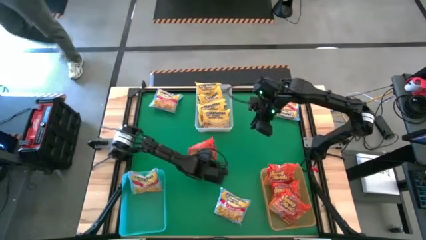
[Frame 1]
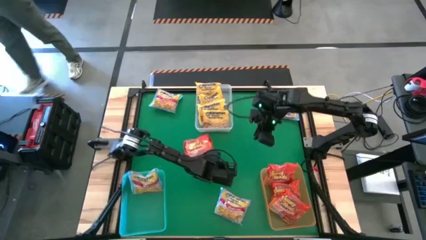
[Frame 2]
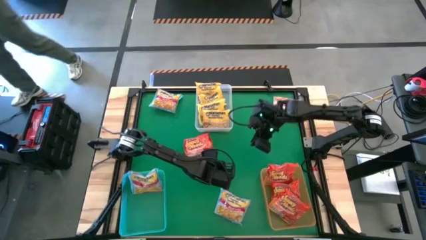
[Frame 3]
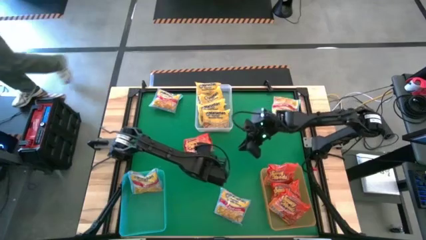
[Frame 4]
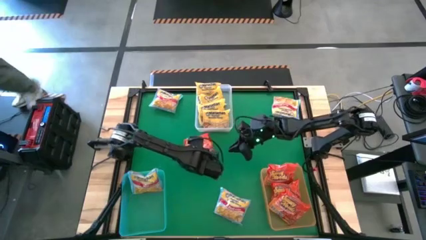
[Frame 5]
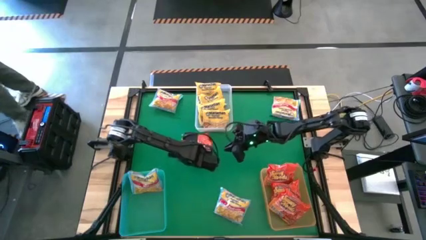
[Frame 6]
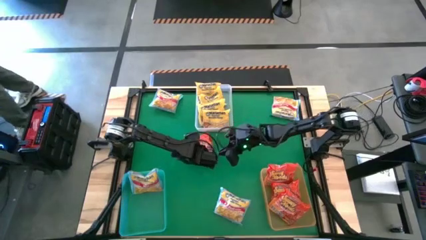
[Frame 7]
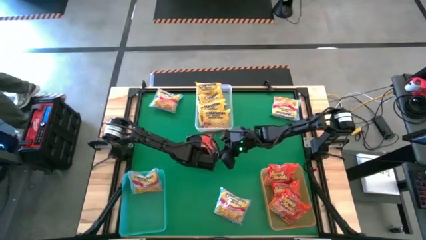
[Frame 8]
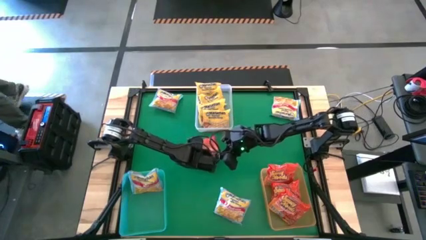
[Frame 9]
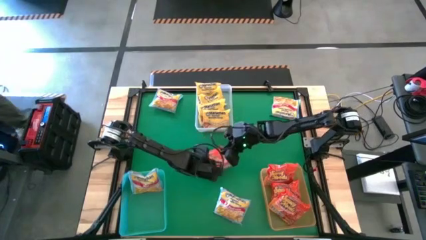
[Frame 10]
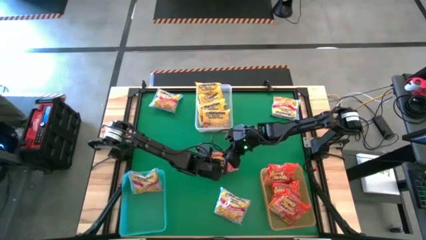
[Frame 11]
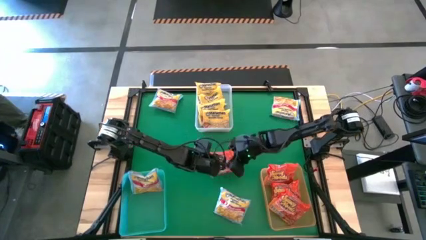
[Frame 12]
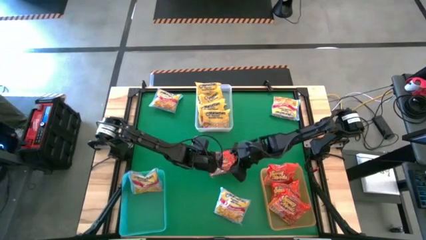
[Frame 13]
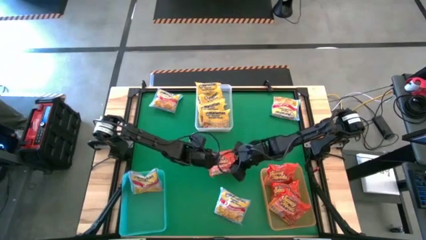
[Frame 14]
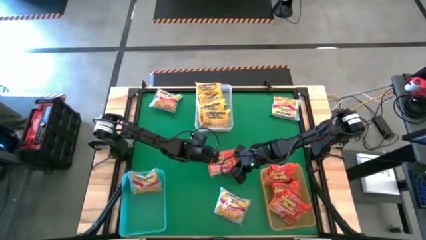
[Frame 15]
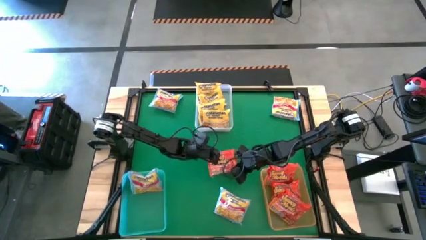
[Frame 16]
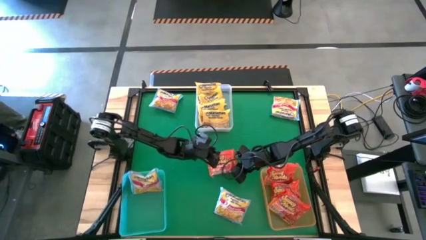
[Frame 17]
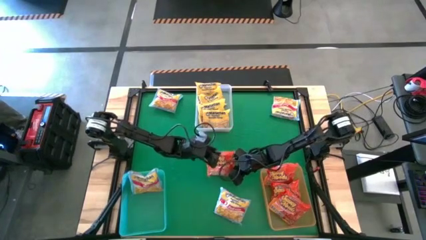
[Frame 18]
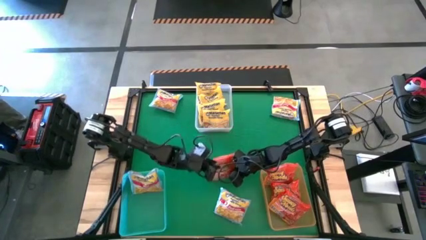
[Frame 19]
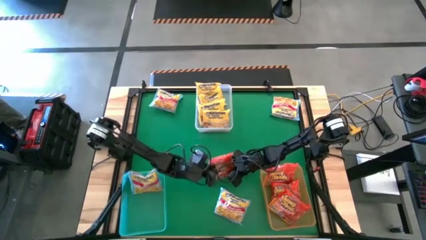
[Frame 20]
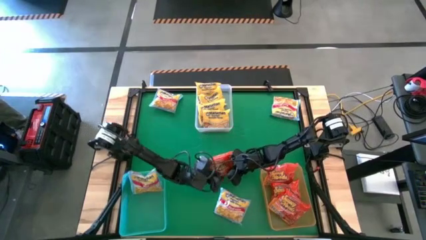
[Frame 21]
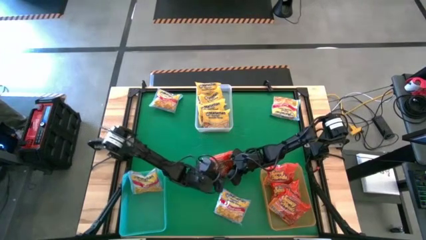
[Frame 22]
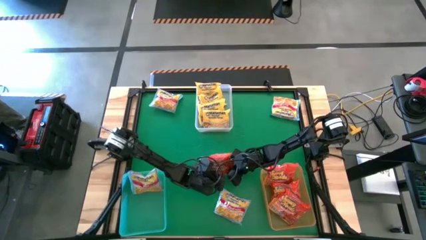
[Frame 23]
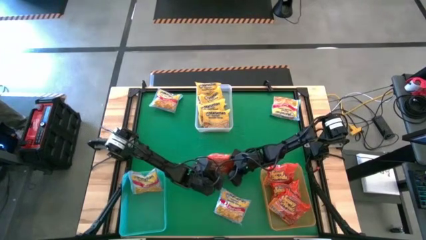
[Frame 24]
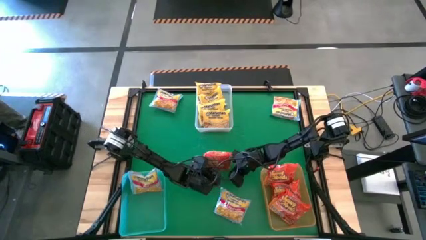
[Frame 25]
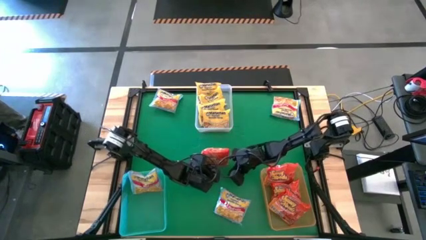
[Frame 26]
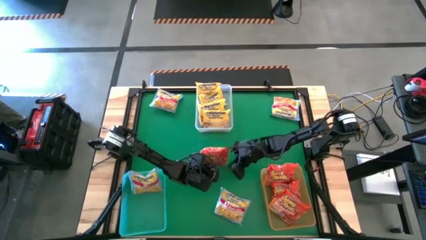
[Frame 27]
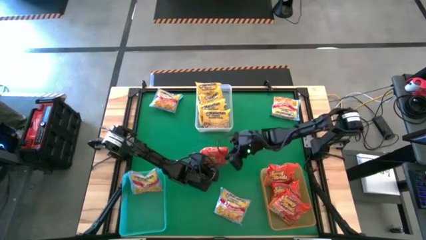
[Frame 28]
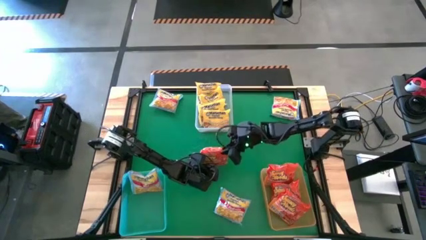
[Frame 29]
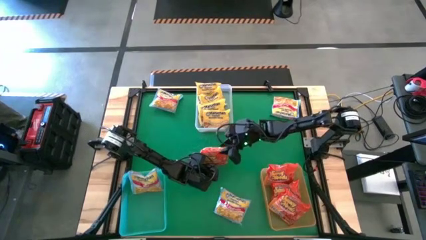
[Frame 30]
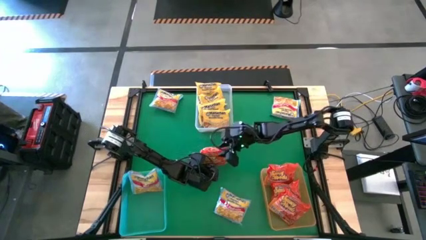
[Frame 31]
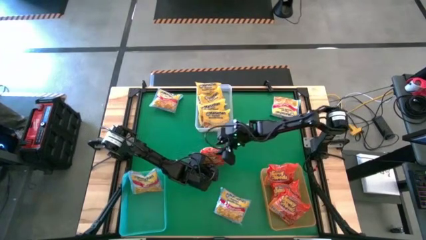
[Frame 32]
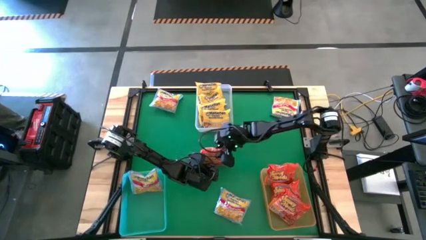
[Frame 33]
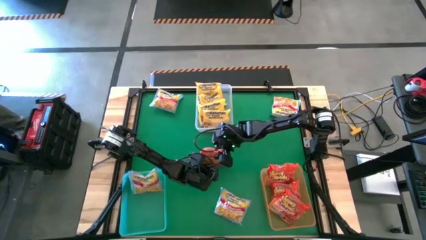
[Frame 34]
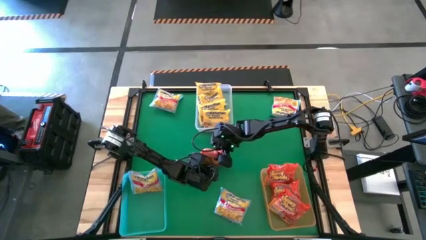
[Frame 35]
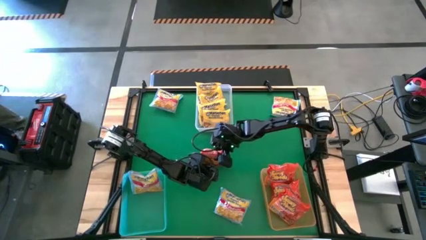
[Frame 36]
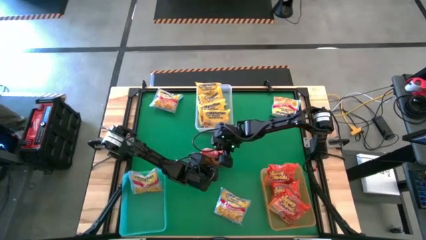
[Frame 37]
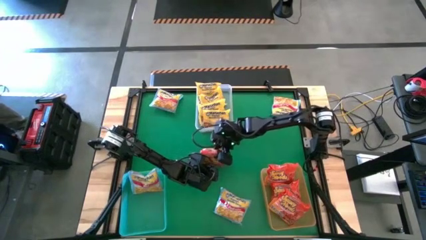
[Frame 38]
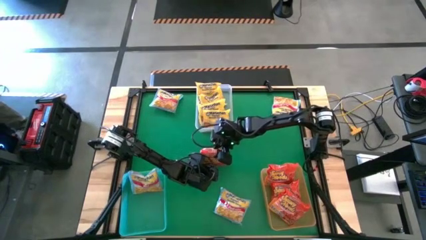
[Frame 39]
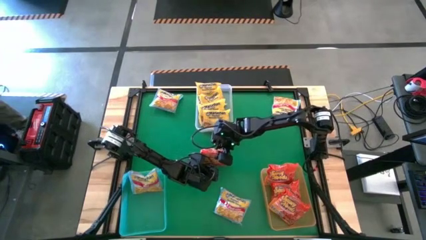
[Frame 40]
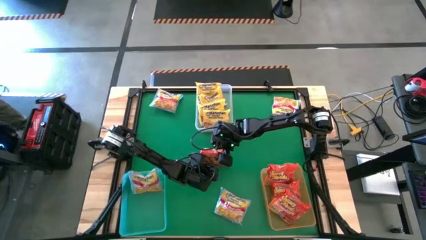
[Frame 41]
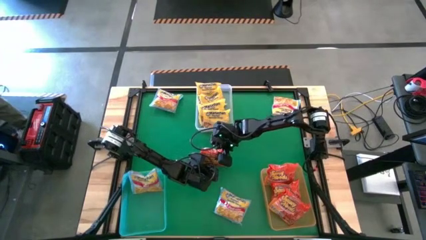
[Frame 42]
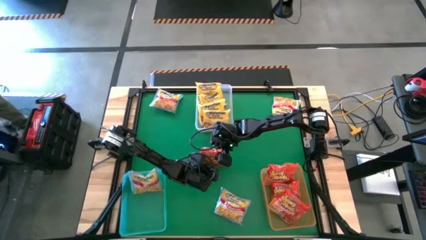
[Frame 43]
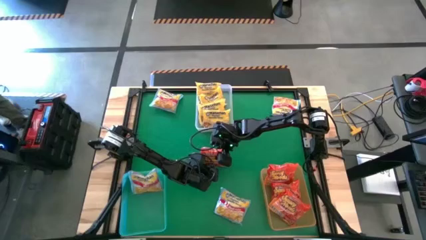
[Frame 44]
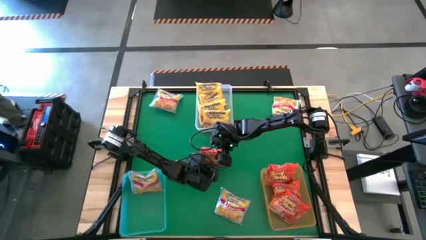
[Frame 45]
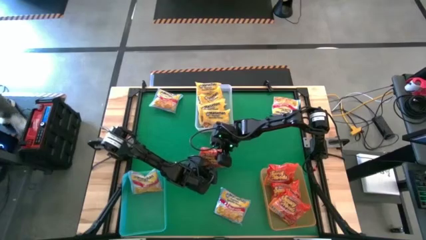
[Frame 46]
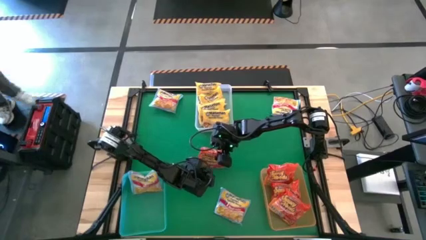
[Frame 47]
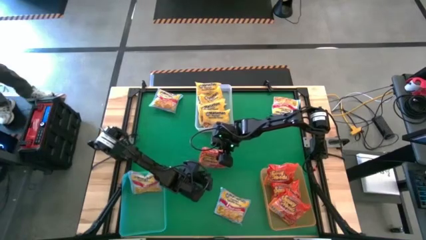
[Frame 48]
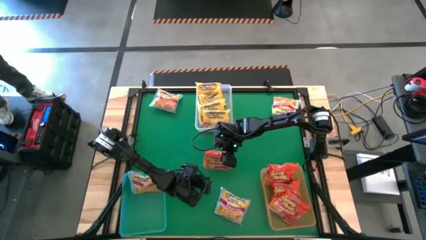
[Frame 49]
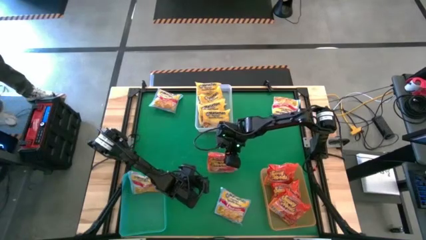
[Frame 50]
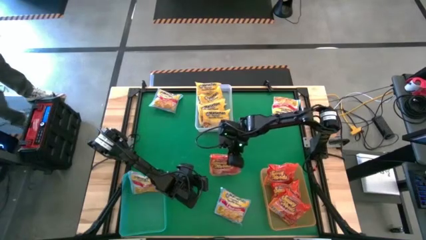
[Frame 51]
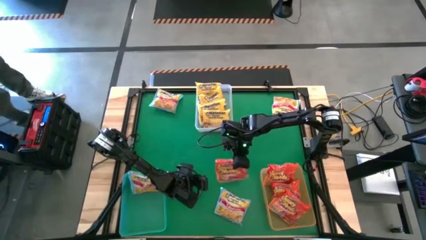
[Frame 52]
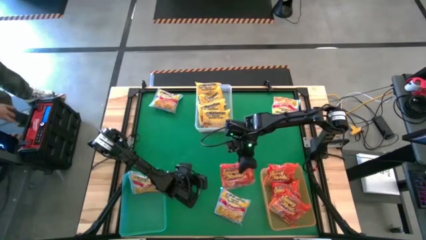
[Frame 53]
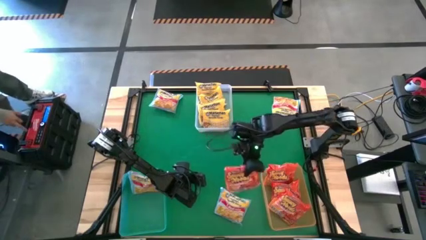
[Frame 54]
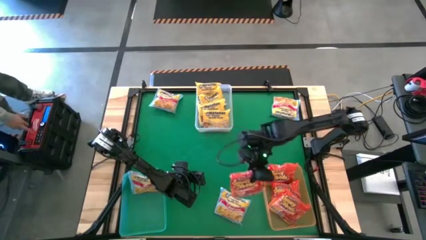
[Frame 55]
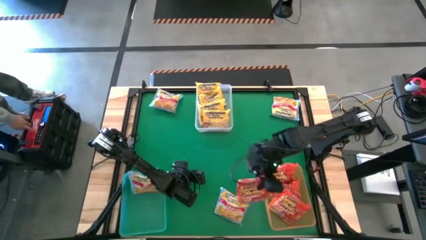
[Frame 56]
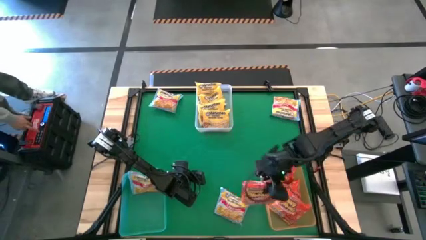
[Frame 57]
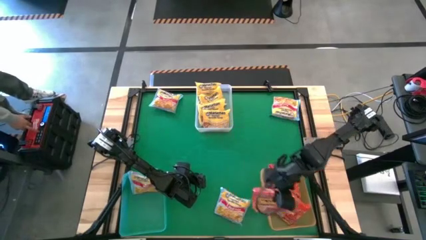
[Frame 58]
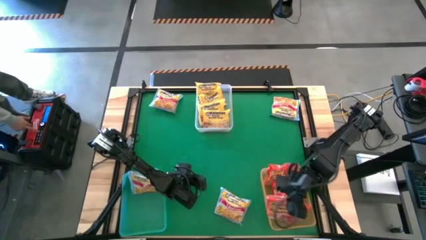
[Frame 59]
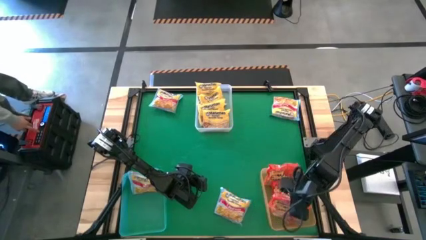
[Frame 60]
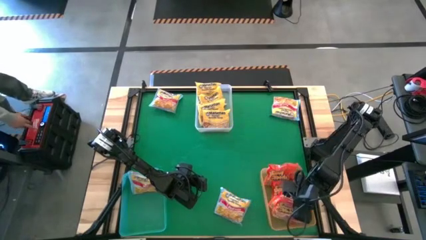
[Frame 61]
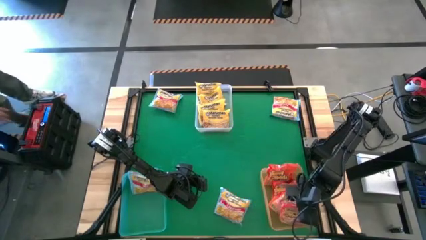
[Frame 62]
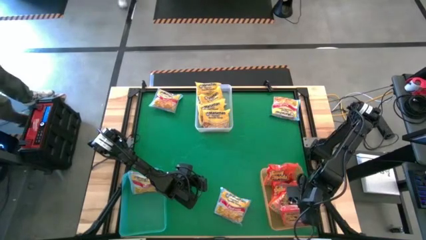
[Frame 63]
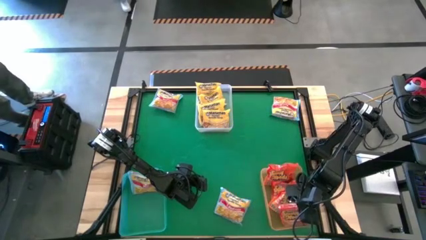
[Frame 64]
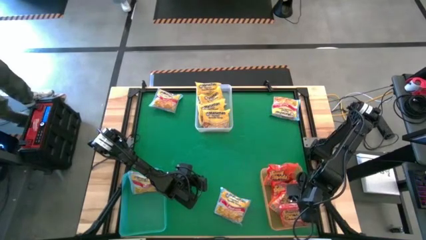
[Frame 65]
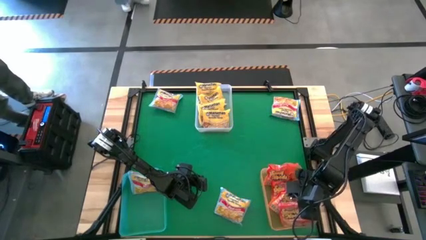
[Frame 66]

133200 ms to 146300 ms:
Task: Sort Maruchan noodles
Put the orange noodle pack into the orange bin

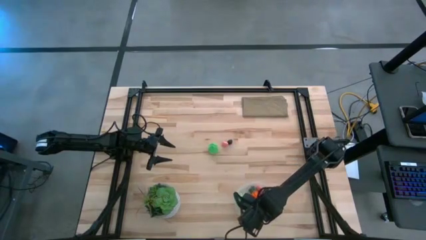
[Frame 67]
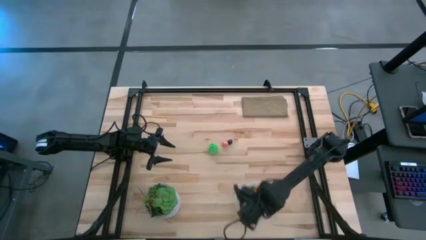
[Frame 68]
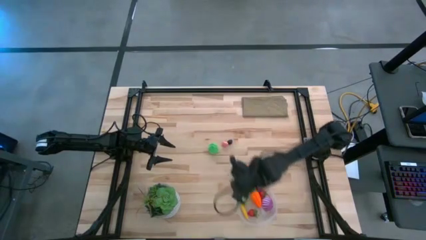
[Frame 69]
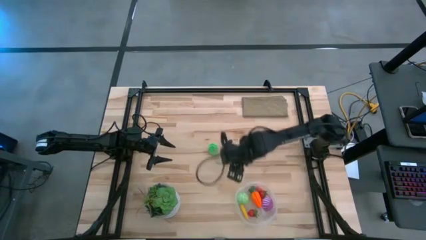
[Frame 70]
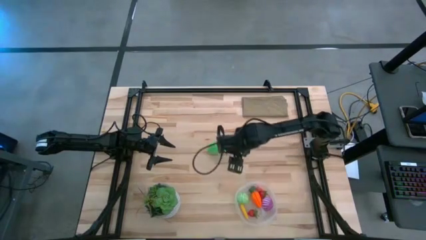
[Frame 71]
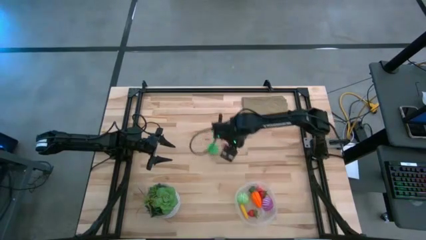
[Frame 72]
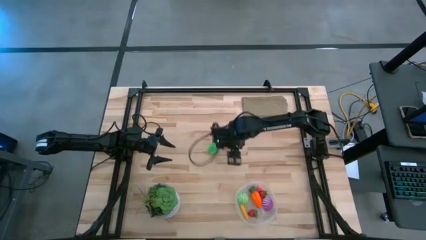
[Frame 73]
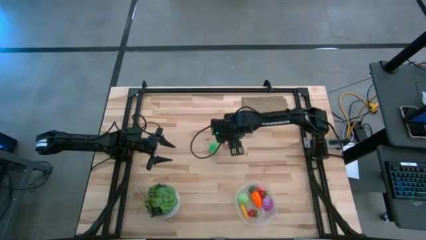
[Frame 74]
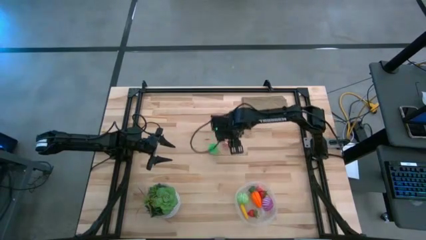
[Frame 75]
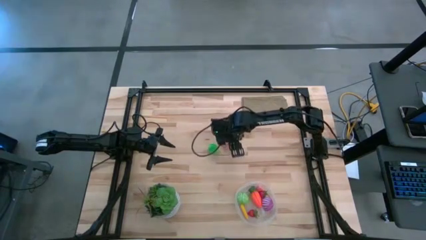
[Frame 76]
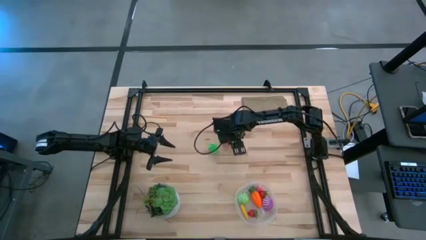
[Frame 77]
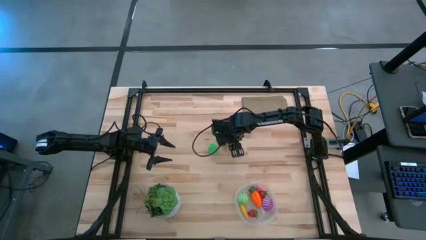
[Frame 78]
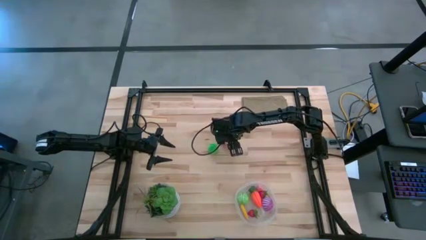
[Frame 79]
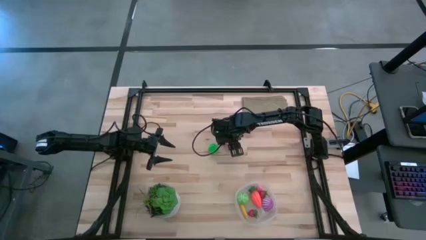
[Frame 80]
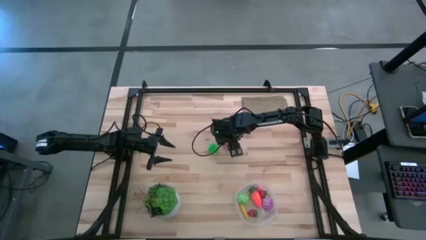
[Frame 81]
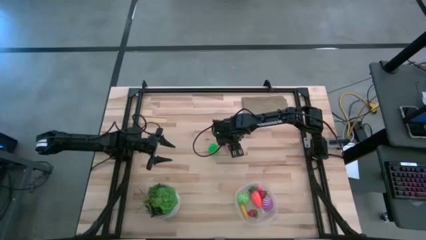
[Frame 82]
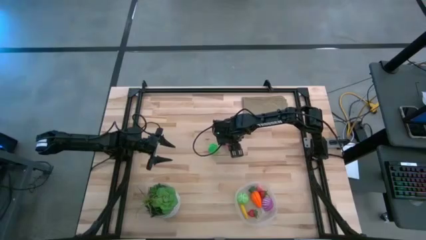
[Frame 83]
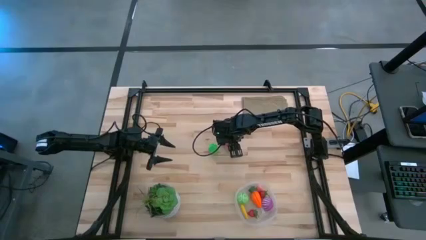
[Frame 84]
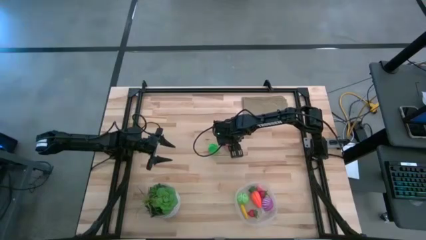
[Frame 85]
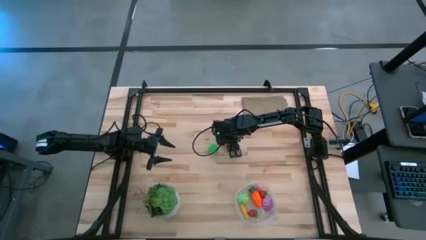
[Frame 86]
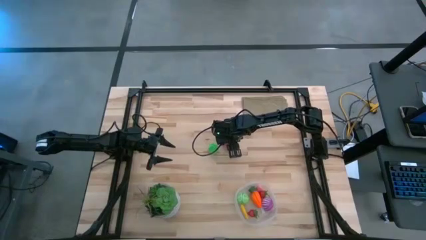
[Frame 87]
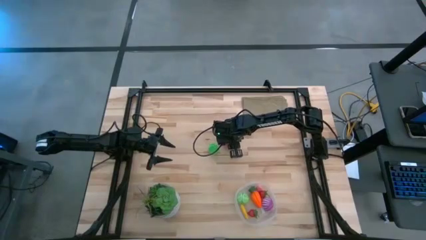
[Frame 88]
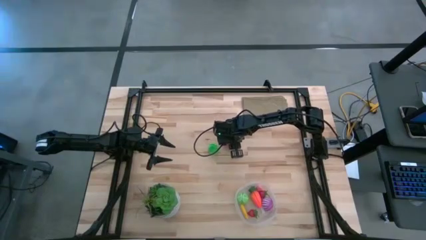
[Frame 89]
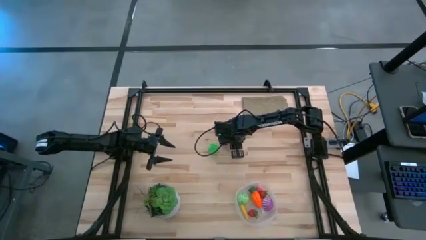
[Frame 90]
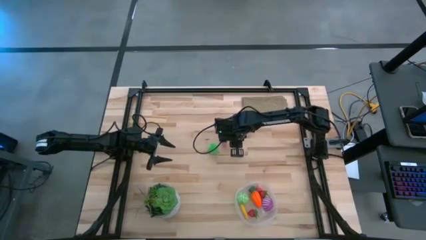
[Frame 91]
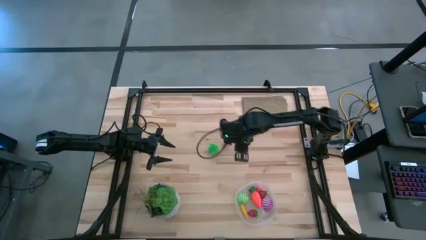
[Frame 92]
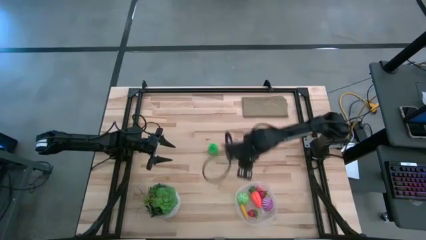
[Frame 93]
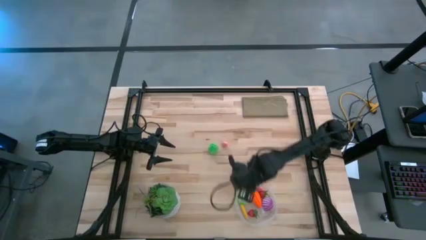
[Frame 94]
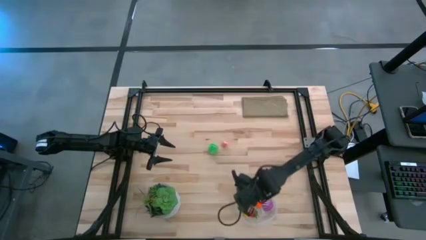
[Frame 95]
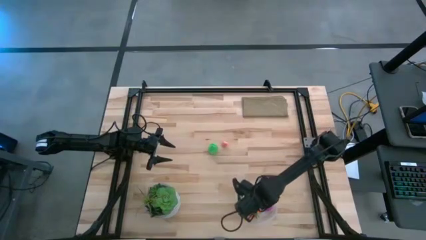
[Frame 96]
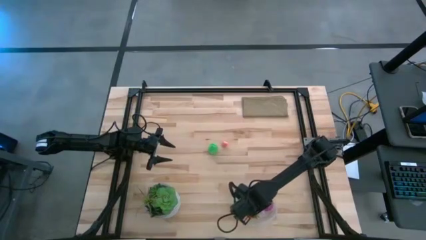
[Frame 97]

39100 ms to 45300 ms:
Task: Pick and placing Produce into tupperware
Put the black berry into the transparent container
